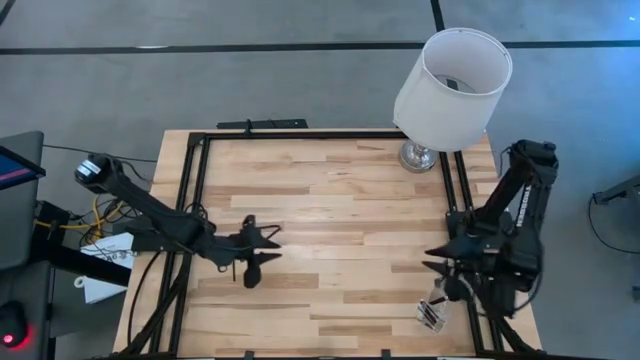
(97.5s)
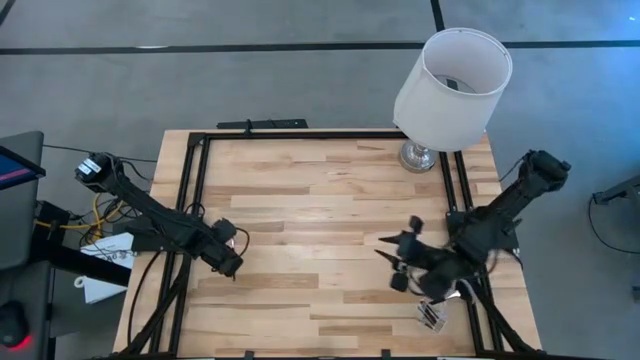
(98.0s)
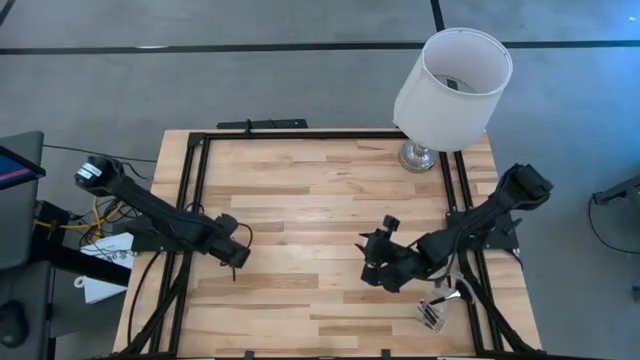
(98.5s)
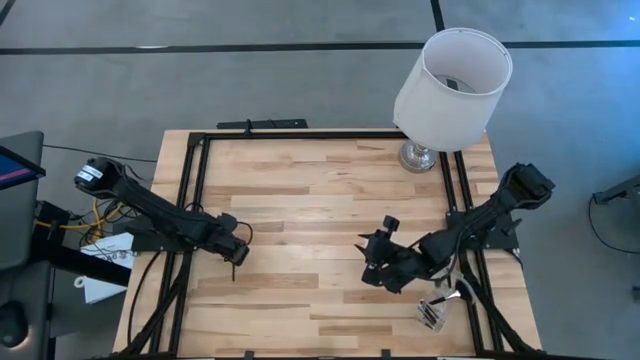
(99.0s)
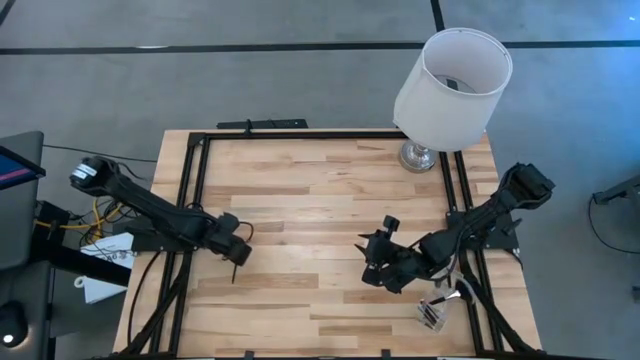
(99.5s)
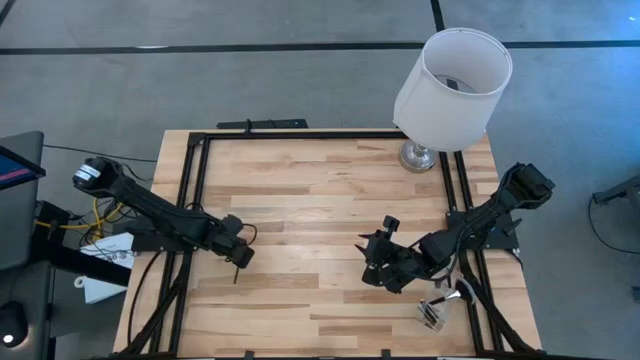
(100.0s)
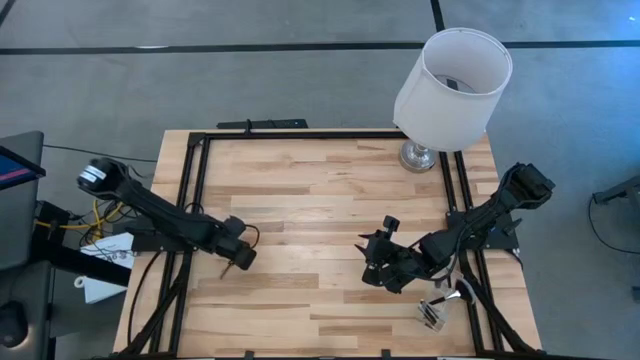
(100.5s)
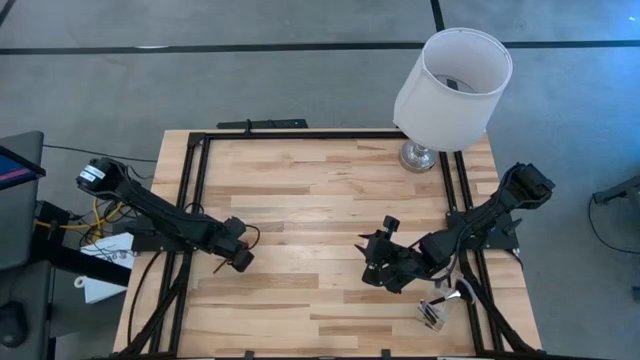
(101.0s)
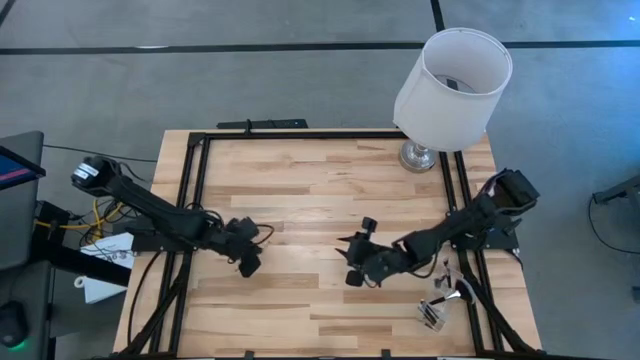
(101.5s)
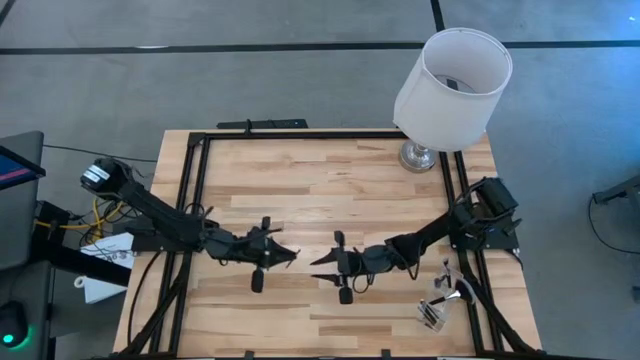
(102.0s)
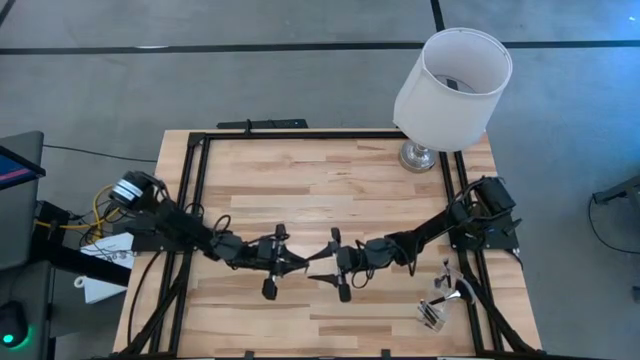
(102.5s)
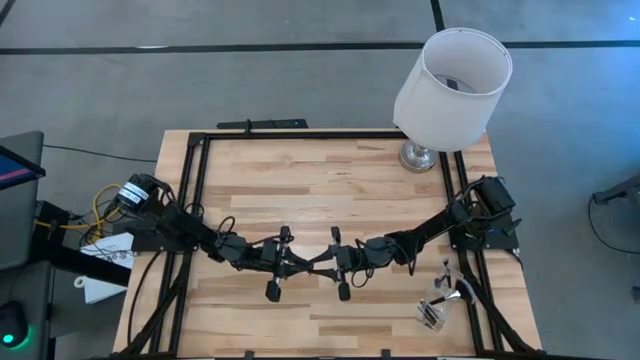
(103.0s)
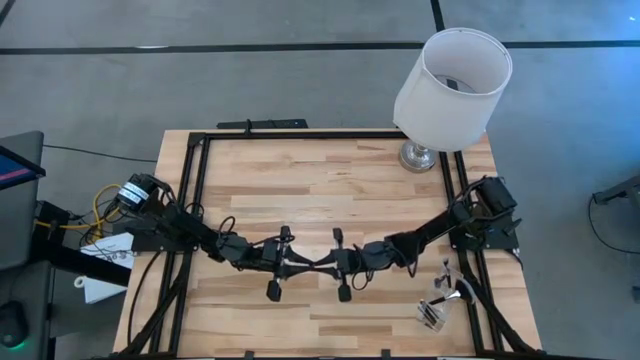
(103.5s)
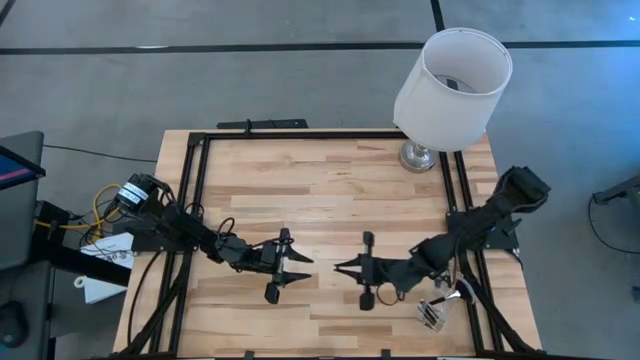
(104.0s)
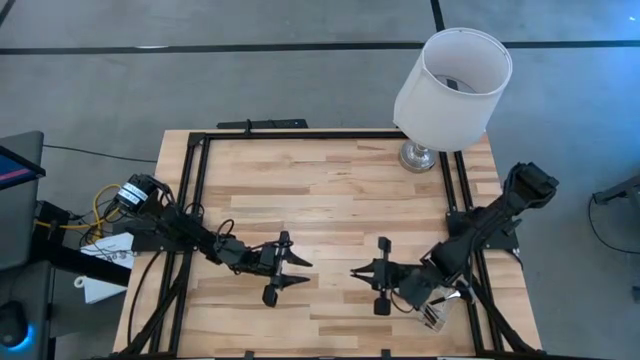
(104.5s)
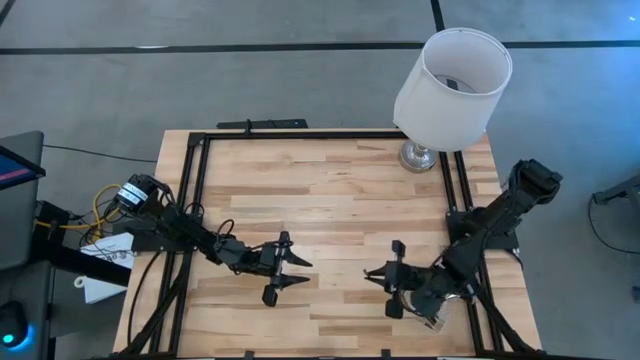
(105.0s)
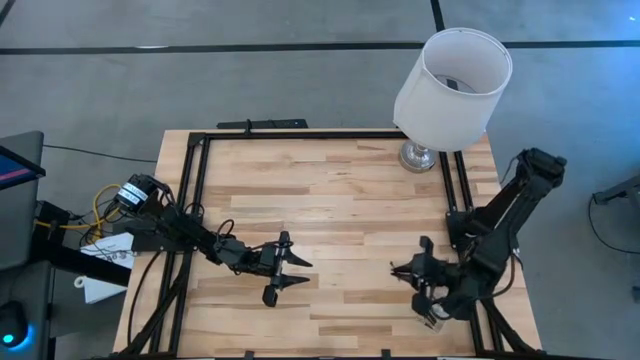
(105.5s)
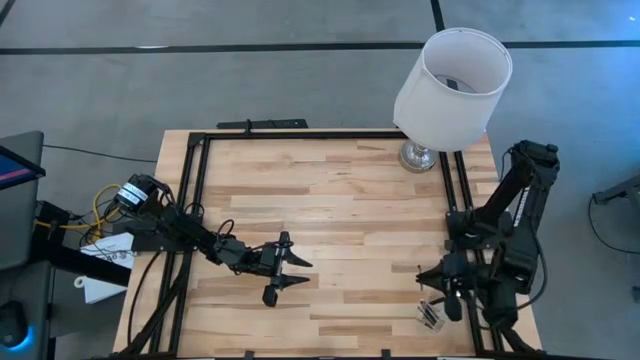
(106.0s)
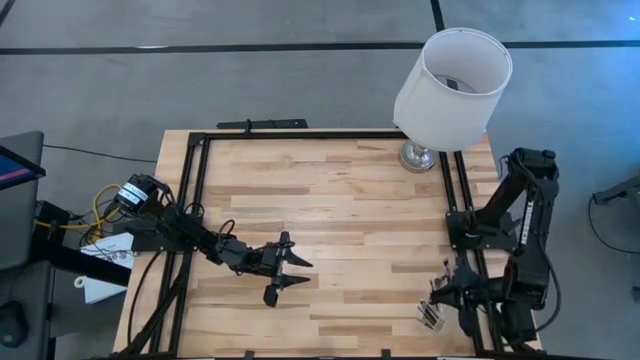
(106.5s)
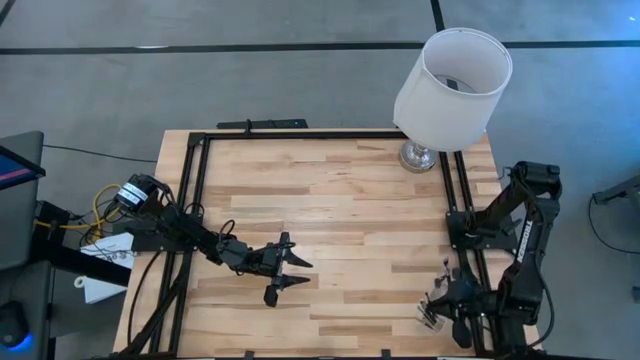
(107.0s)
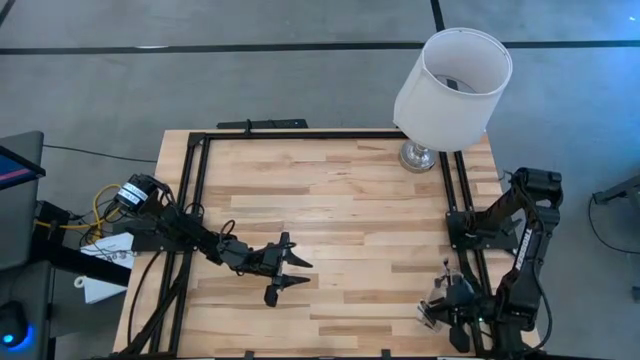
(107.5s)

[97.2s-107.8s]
Task: Pick & Place Makeup Brushes
Put the black eyeshadow brush into the transparent organizer

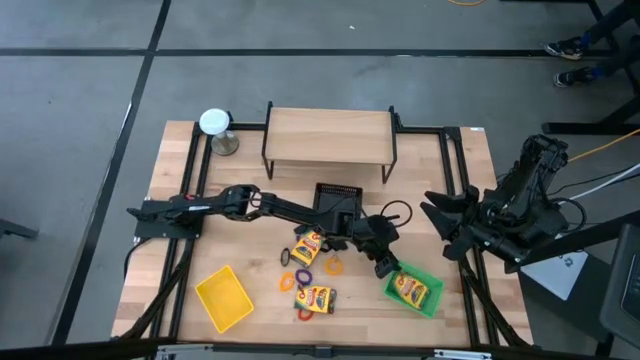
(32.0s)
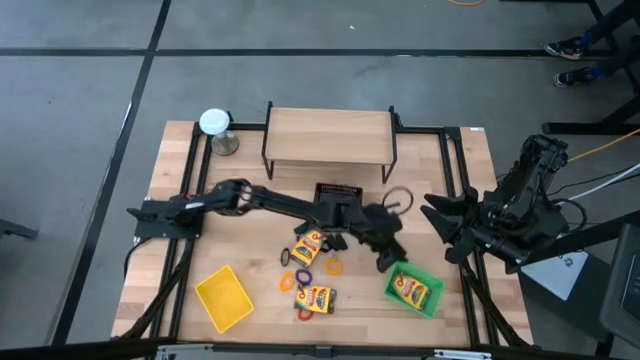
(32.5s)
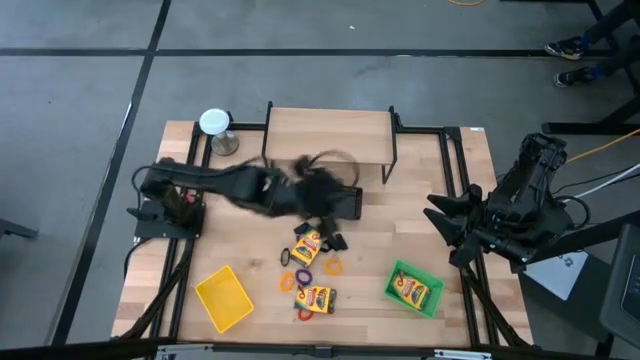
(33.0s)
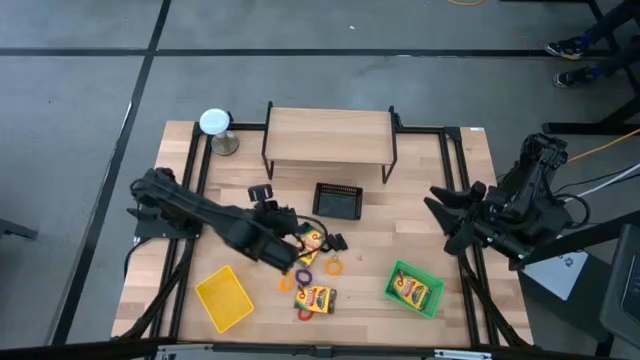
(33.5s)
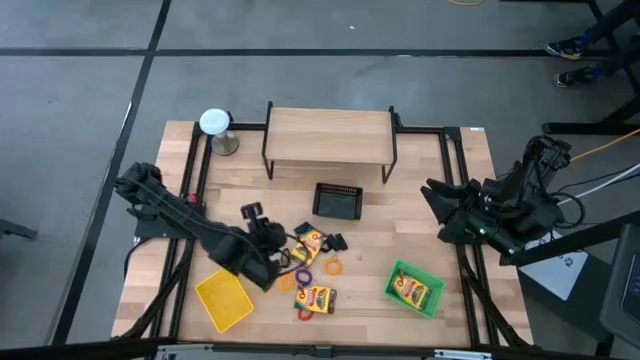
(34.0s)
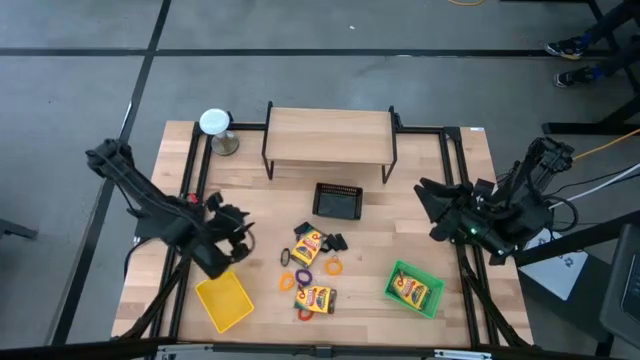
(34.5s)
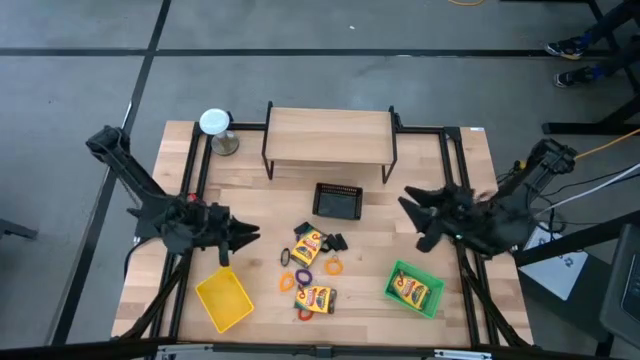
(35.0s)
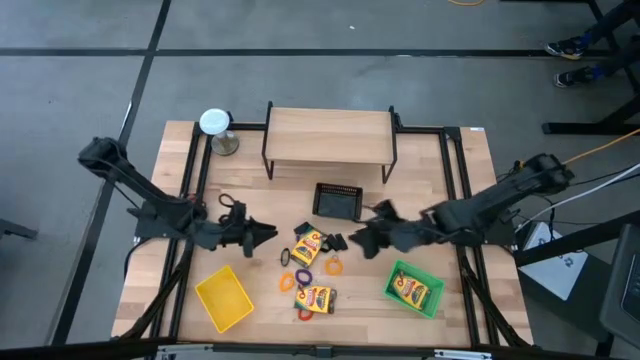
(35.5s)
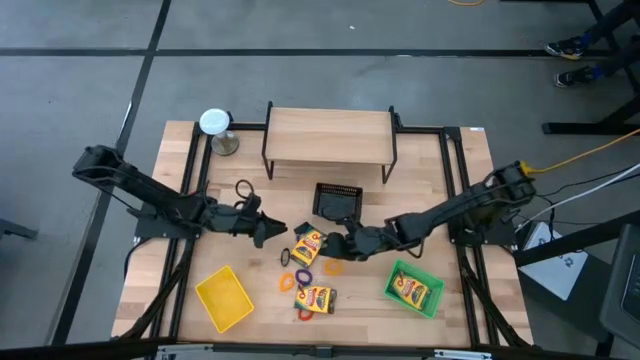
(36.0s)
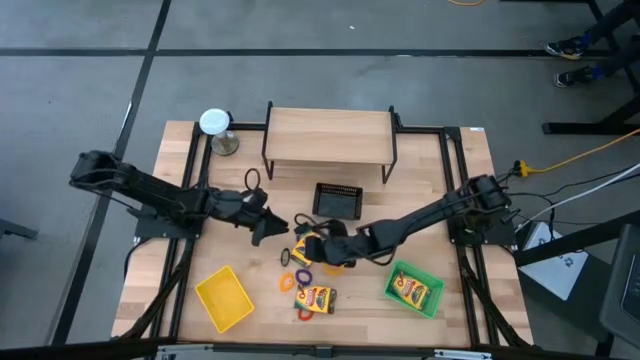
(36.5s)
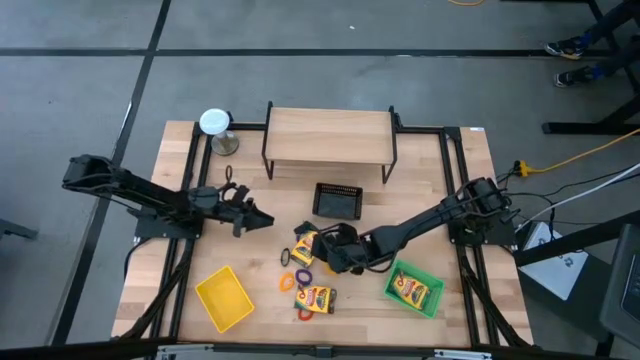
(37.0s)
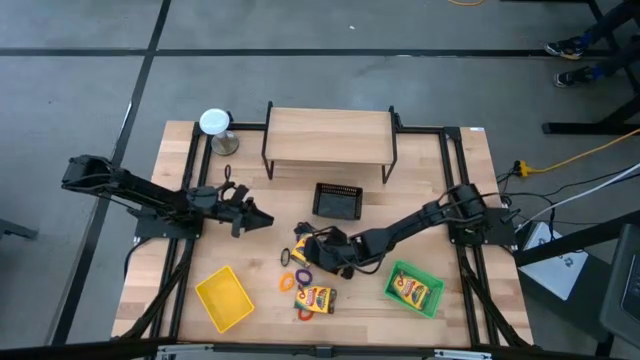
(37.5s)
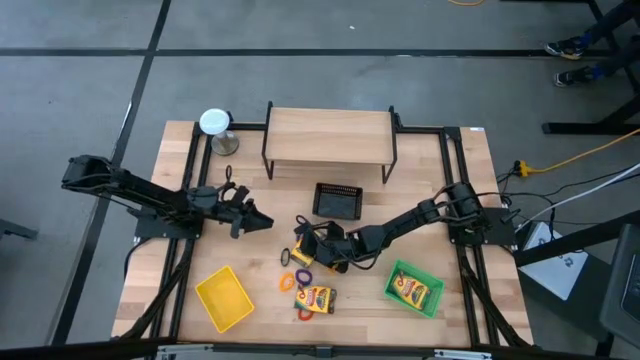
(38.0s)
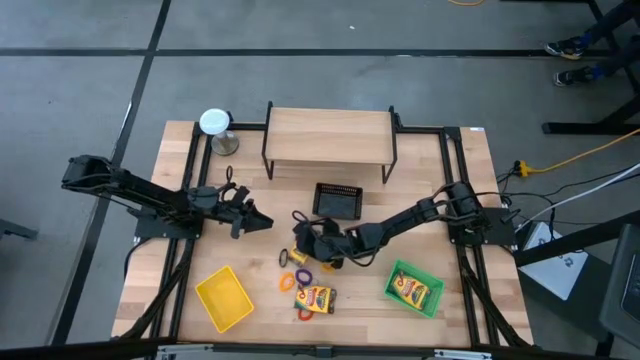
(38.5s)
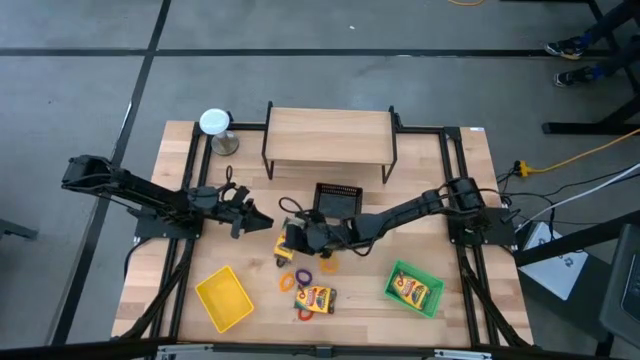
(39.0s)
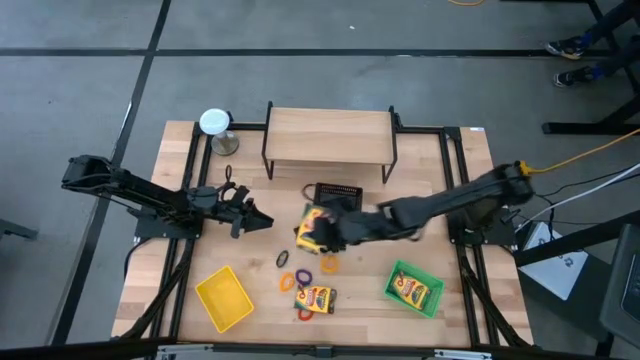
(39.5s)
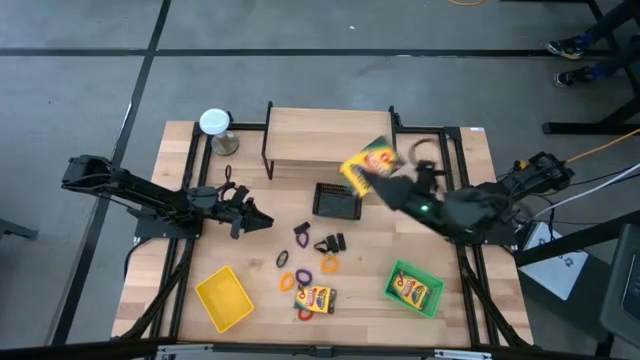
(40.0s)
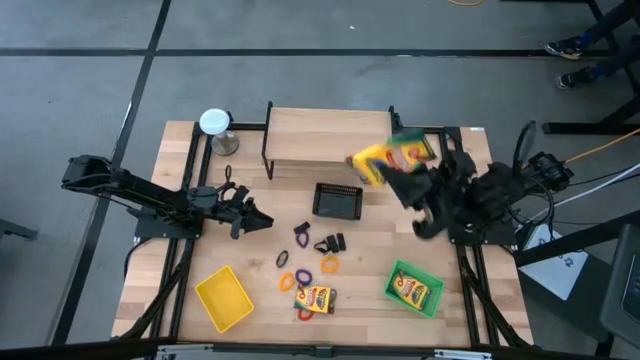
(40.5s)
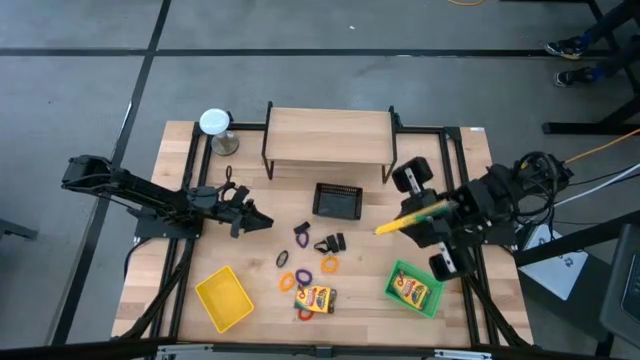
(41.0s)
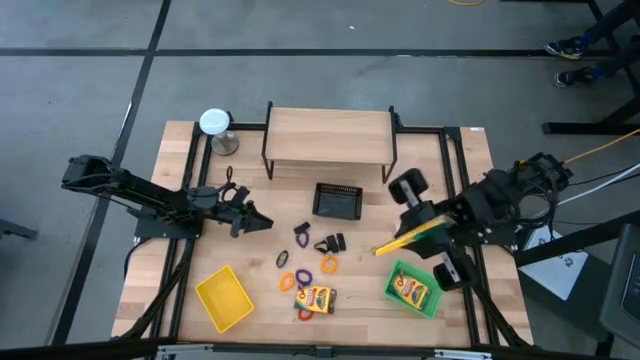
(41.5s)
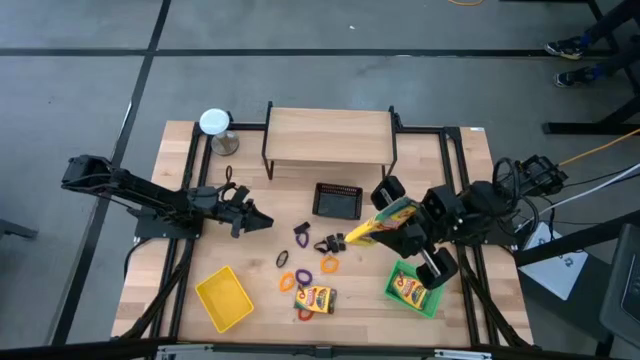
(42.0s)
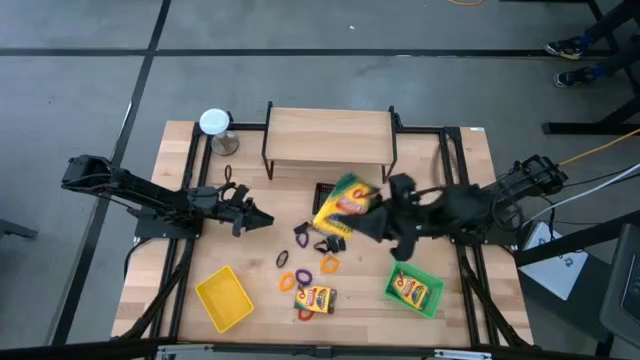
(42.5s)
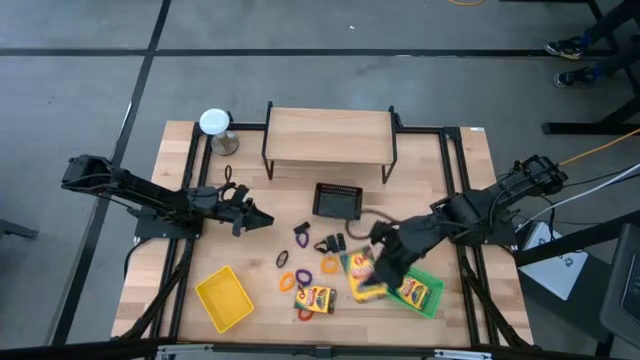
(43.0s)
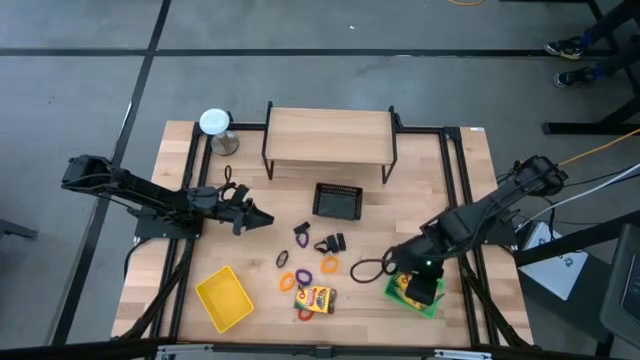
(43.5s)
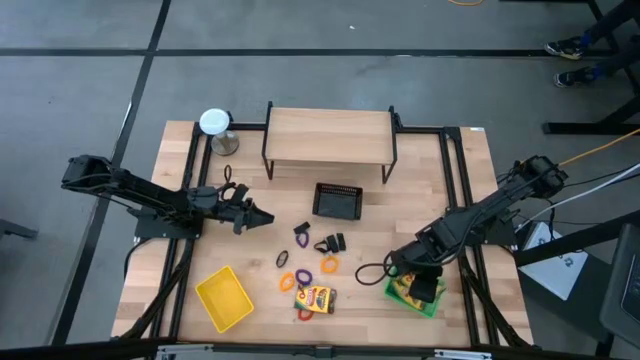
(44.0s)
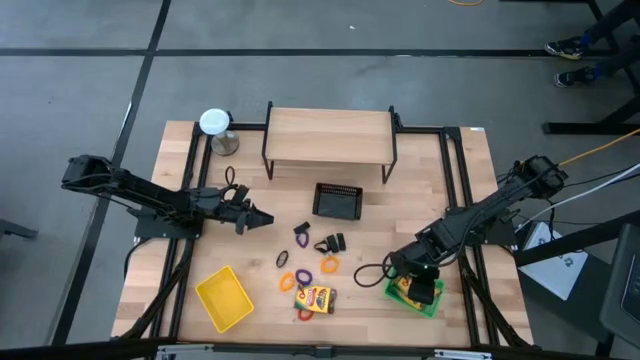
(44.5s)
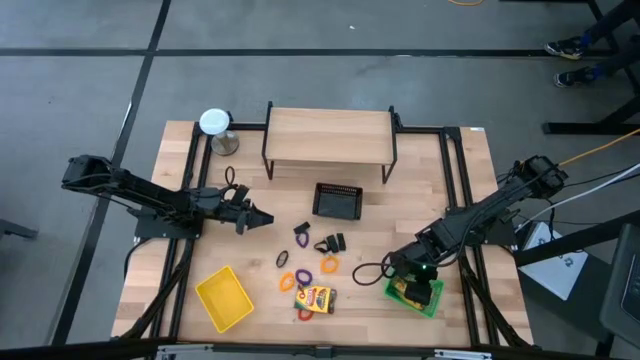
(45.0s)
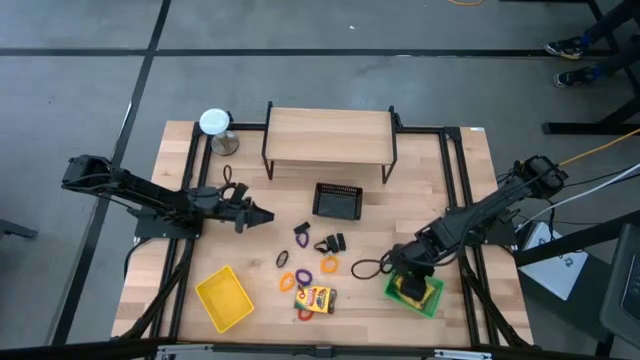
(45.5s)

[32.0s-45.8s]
Task: Pick & Place Office Desk Supplies
Stack the top crayon box on top of the crayon box in the green basket
